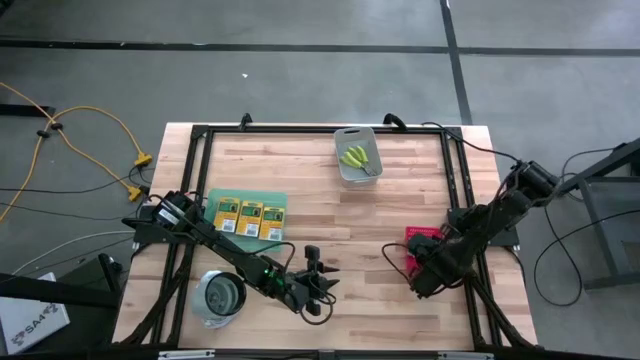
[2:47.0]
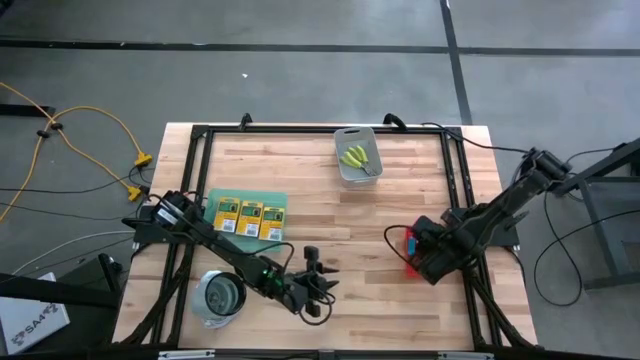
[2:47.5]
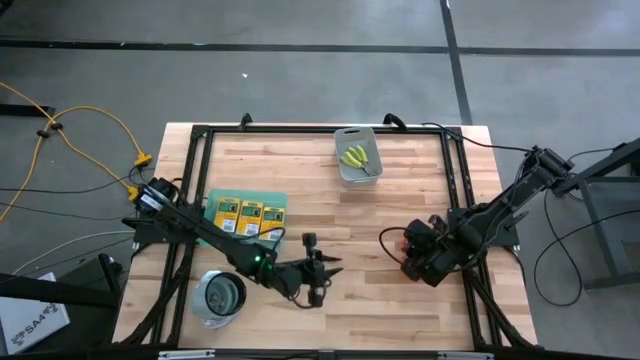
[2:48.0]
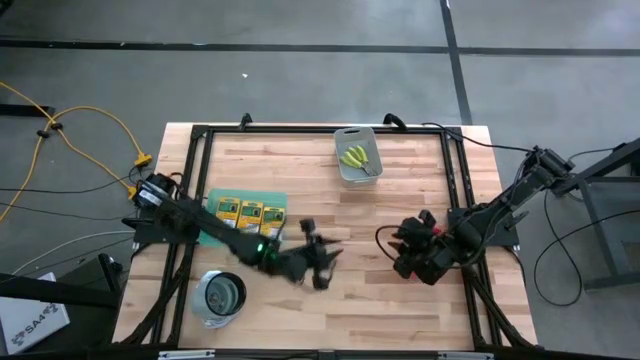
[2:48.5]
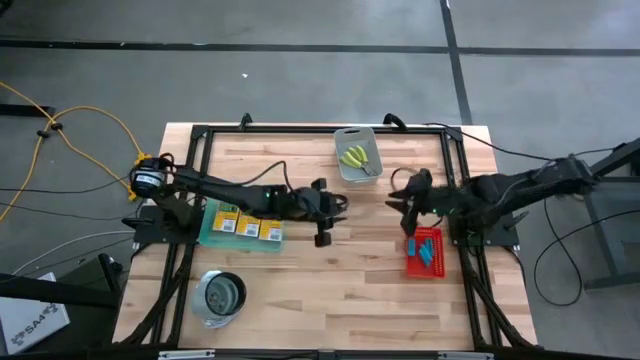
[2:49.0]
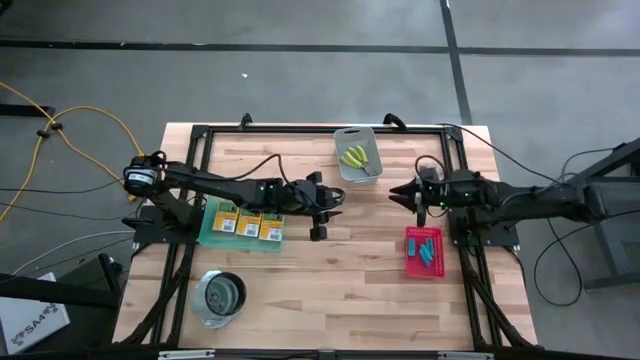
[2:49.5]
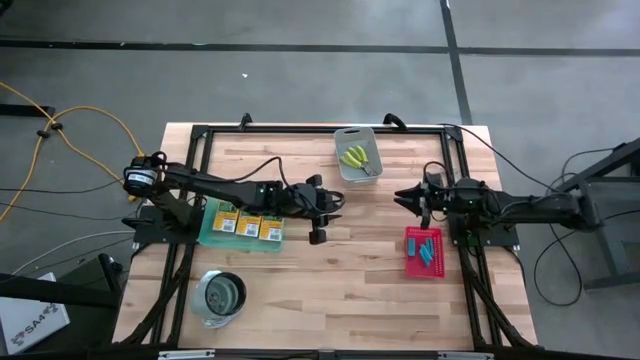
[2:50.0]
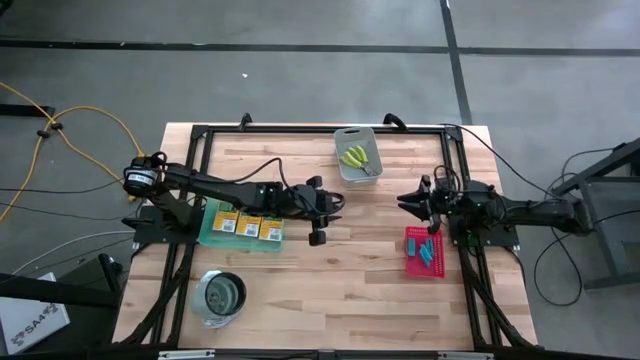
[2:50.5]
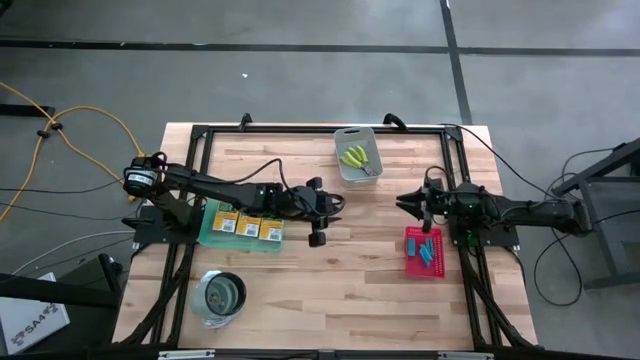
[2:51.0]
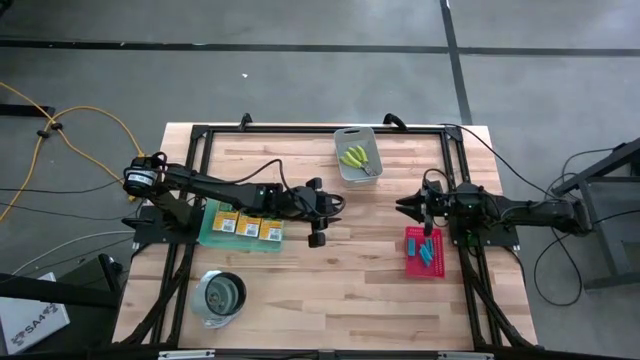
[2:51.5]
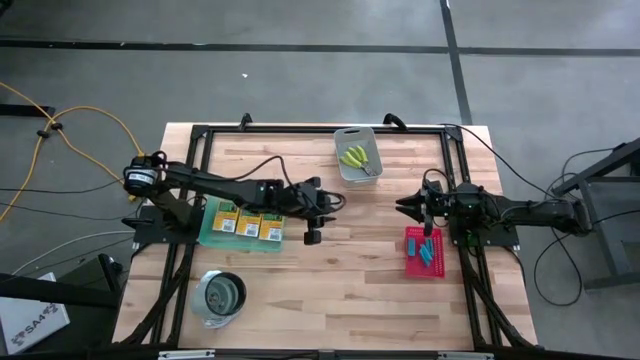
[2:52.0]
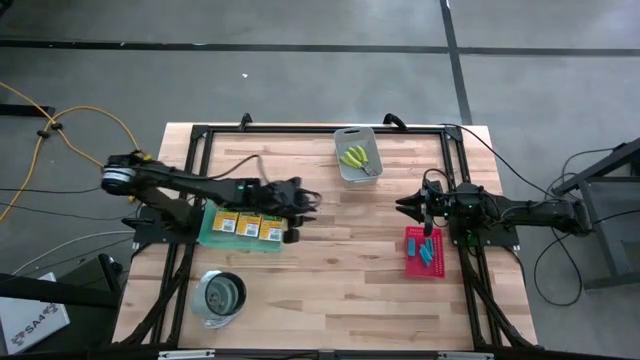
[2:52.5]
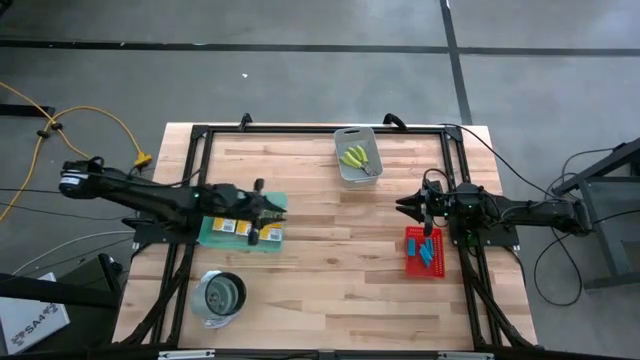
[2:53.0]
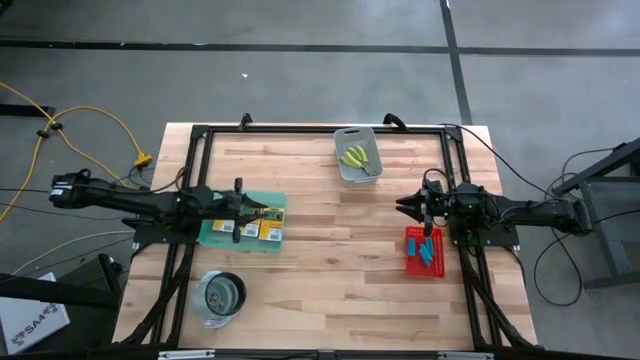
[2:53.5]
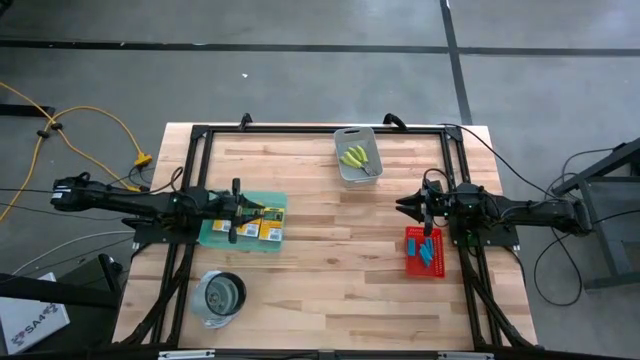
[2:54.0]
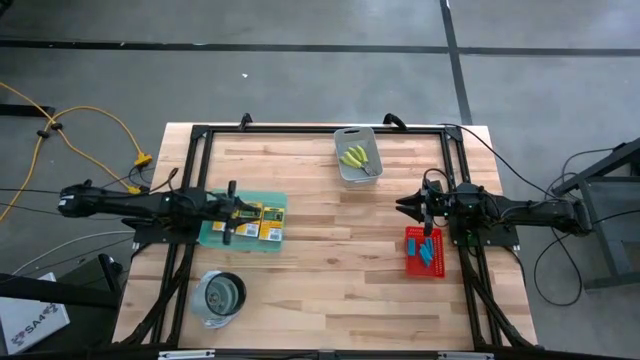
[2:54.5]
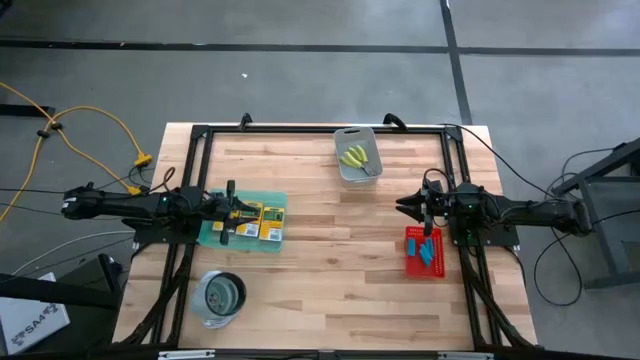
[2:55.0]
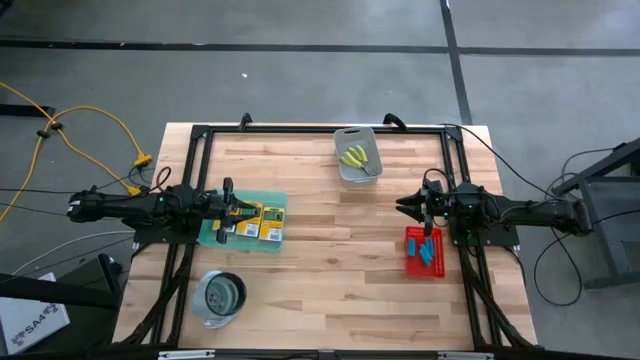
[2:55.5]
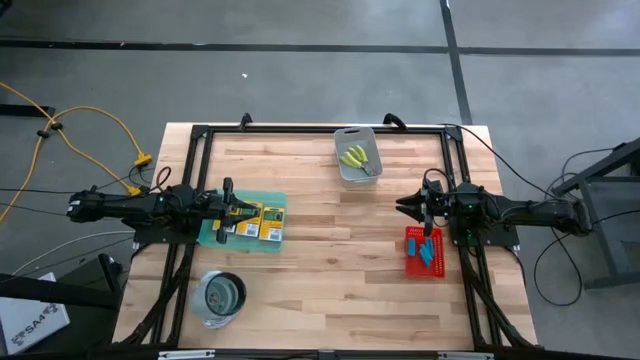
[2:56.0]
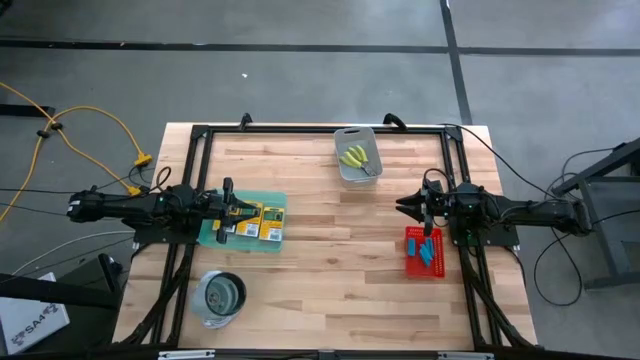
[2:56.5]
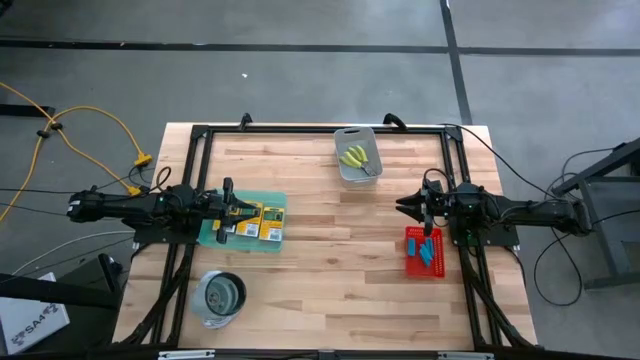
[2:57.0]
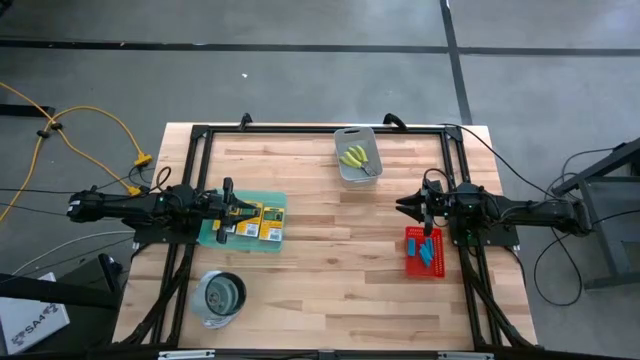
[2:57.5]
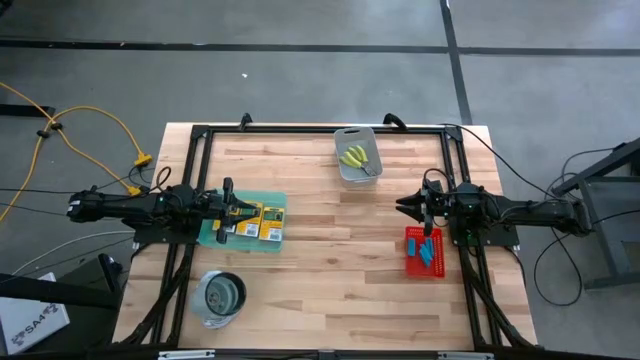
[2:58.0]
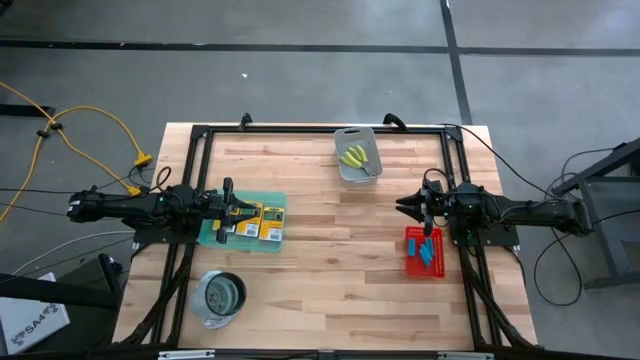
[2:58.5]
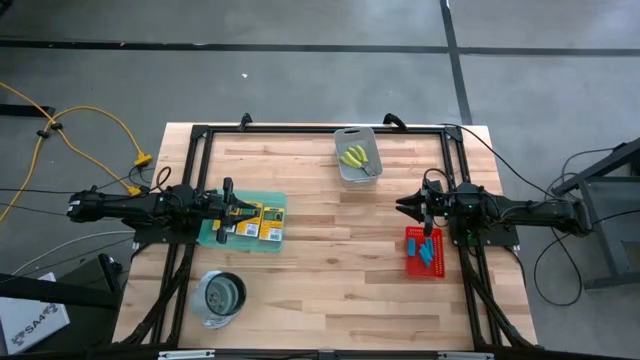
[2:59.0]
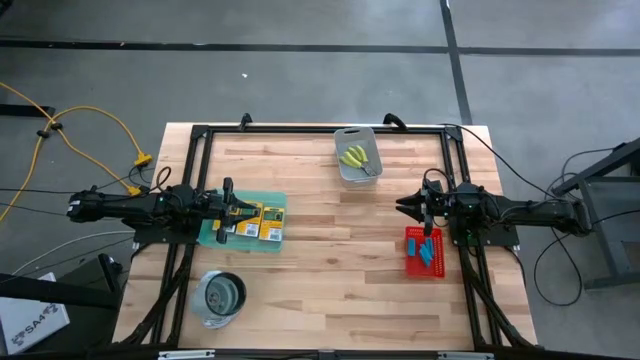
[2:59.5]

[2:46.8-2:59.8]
Task: Pick & Place School Supplies
Return to Home Position

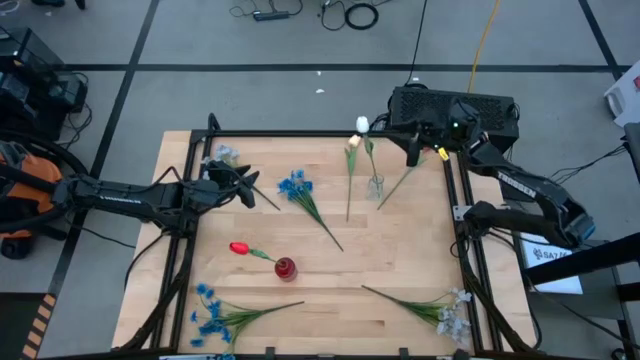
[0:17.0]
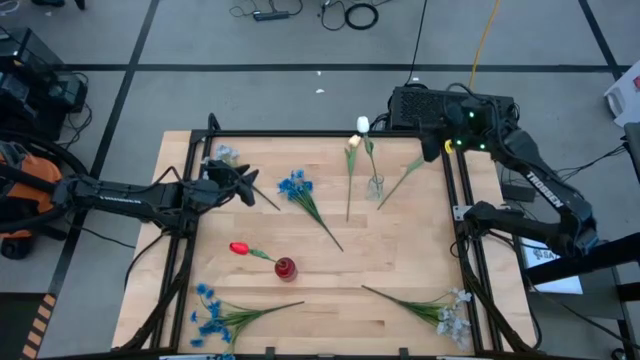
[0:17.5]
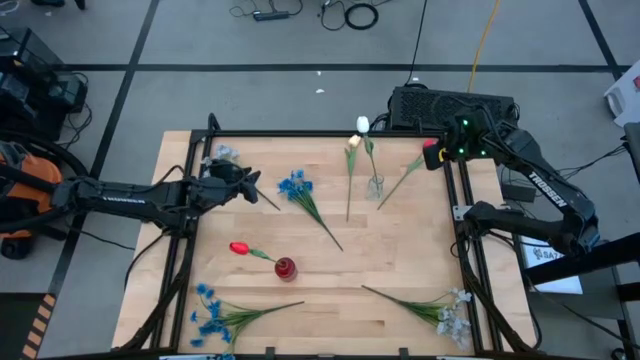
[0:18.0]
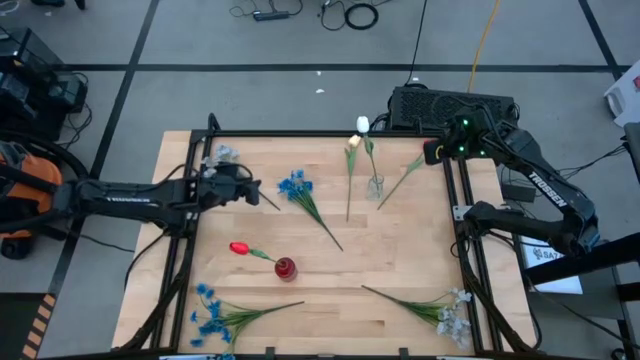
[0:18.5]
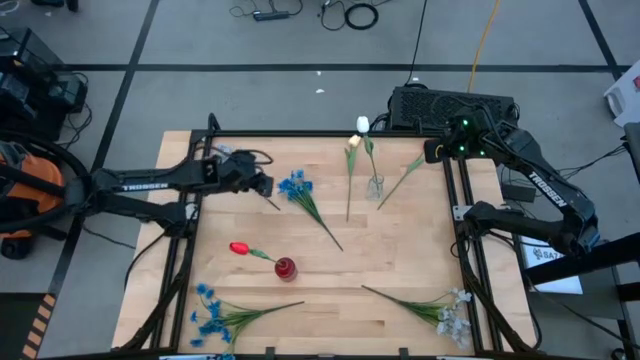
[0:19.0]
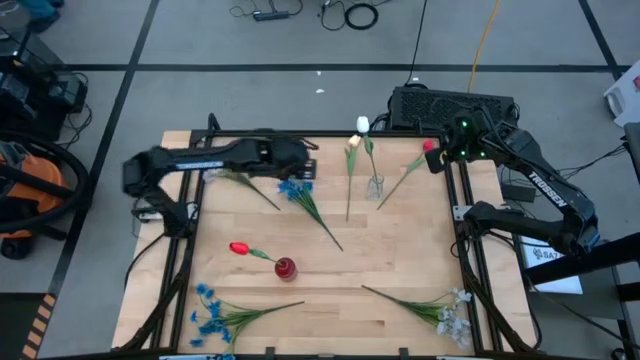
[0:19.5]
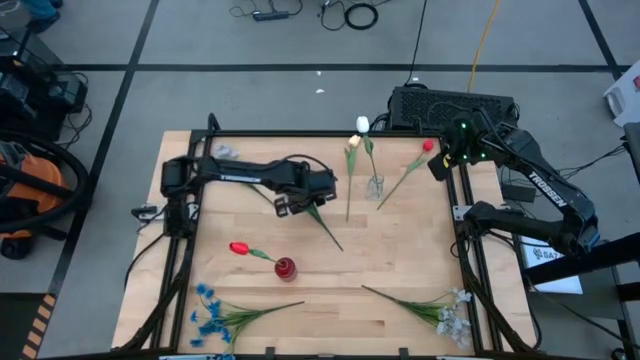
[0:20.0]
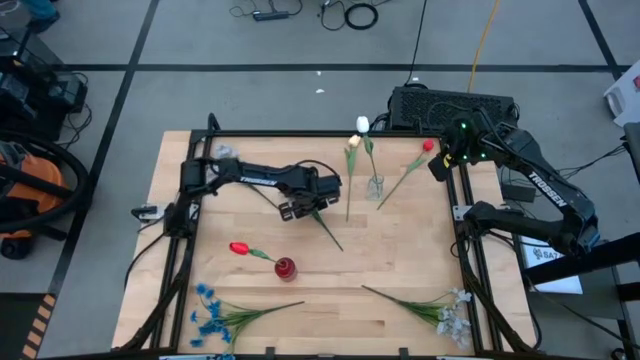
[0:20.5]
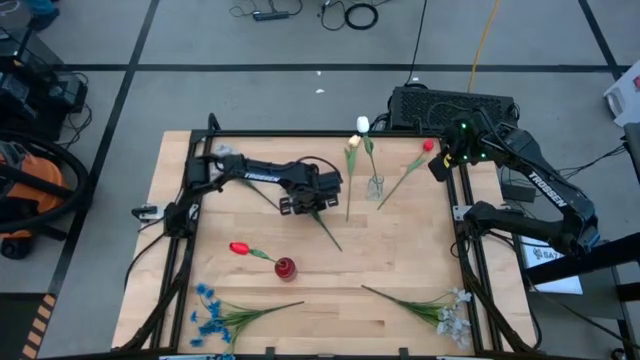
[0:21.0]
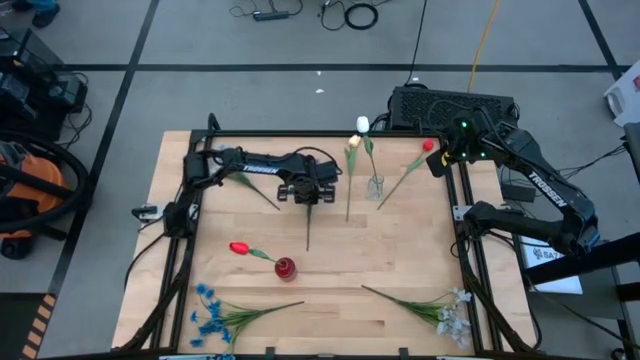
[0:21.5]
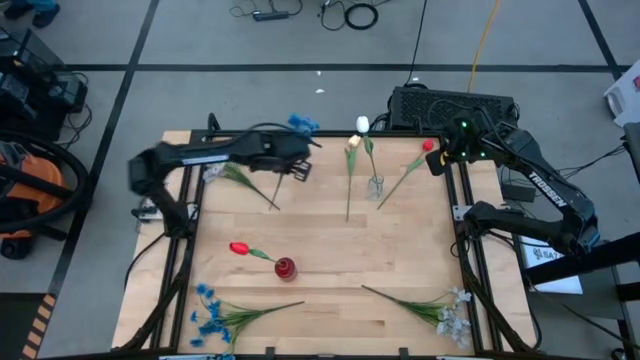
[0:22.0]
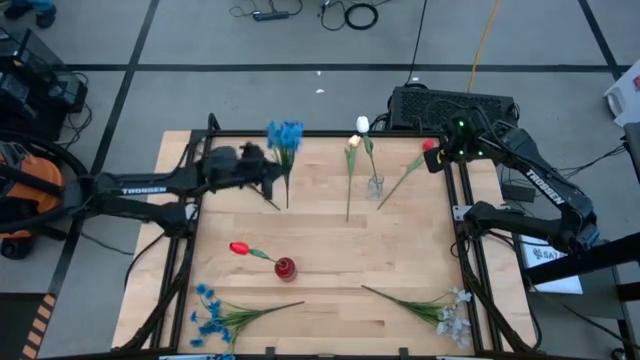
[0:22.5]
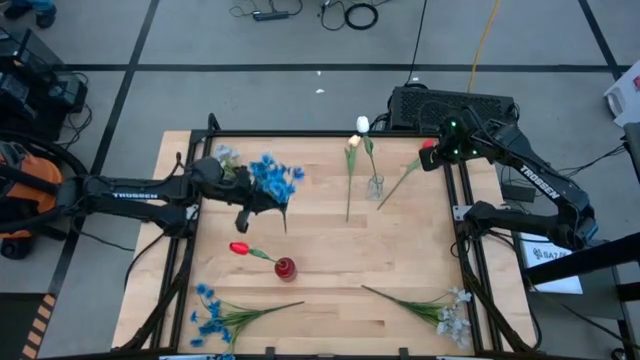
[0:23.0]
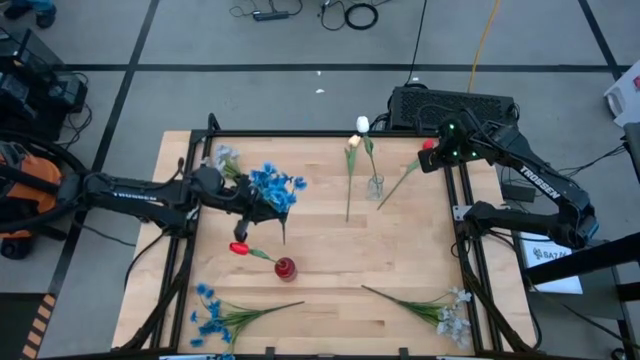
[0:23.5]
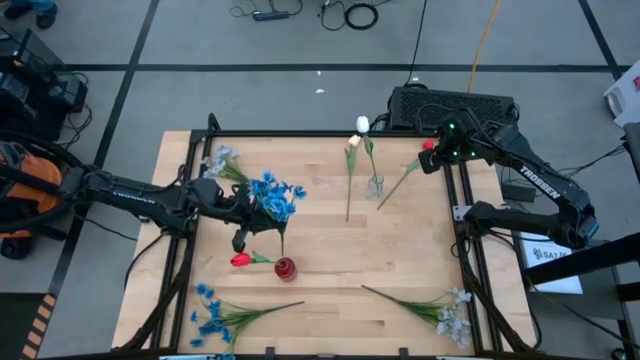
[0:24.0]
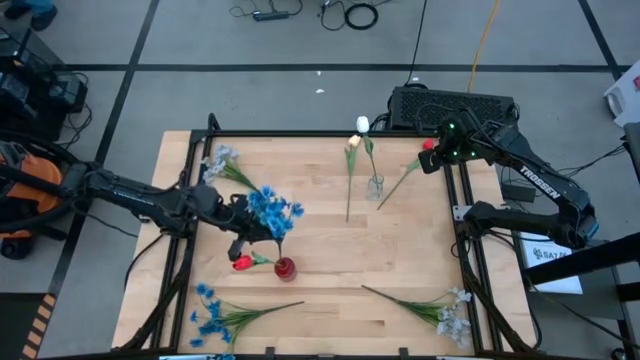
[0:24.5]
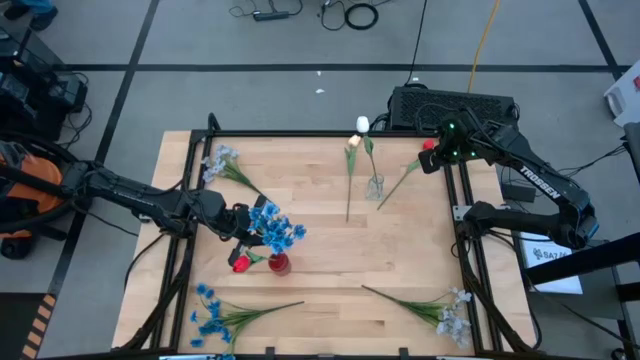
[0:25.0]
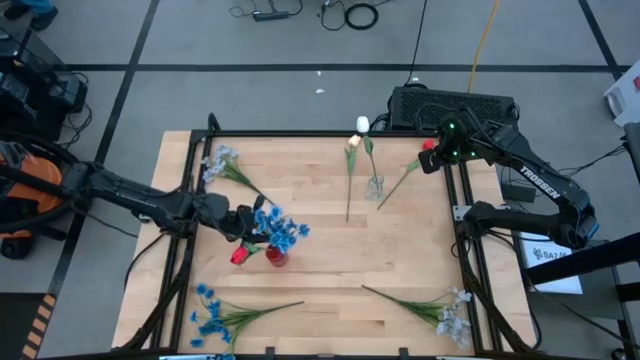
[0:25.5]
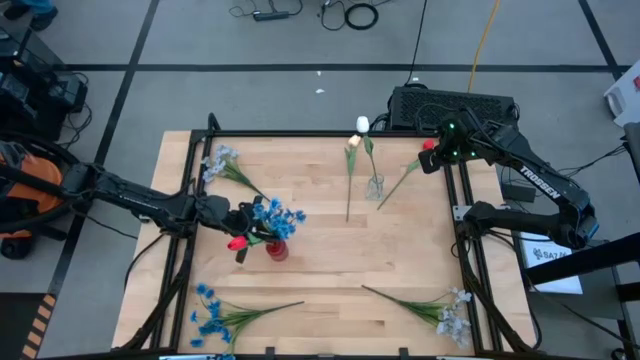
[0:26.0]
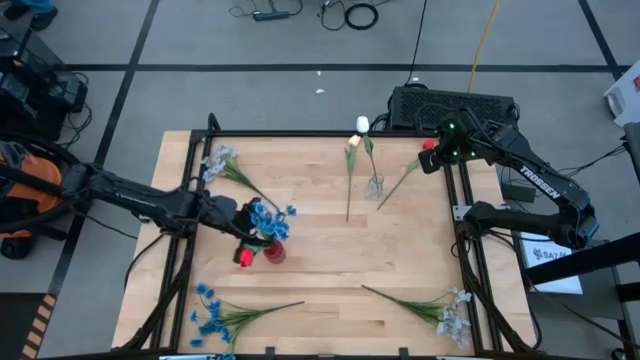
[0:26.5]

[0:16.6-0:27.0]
Task: Sort flowers into vase by color
Put the top blue flowers into the red vase
